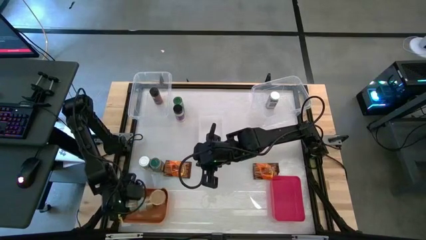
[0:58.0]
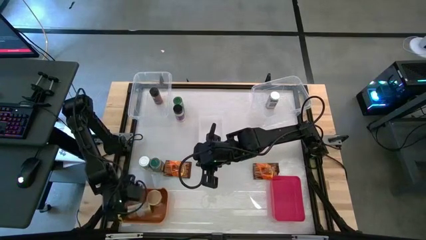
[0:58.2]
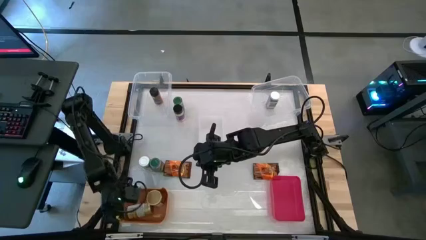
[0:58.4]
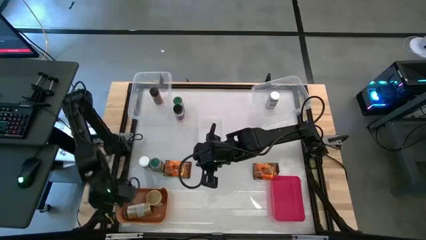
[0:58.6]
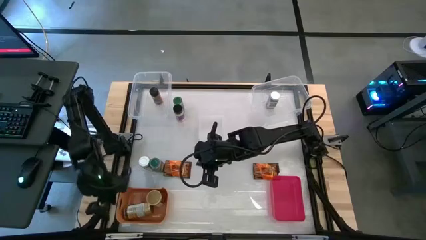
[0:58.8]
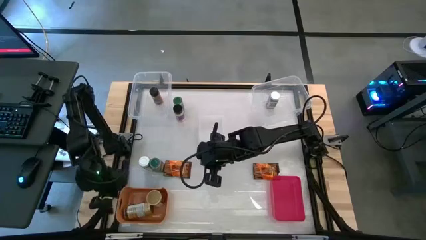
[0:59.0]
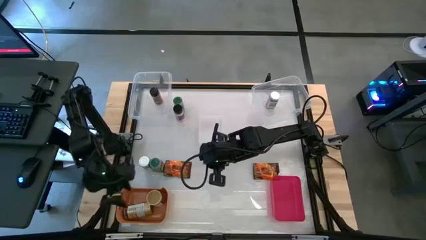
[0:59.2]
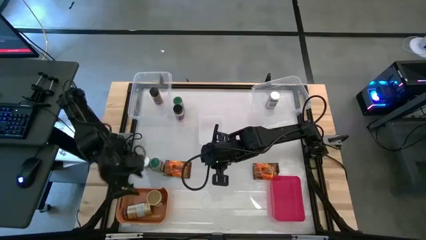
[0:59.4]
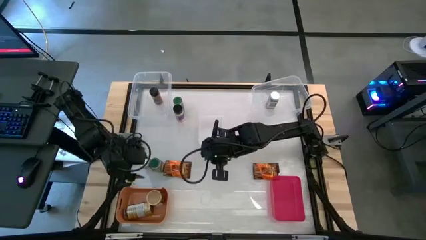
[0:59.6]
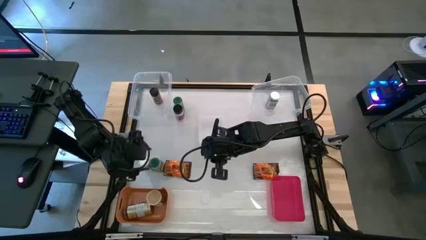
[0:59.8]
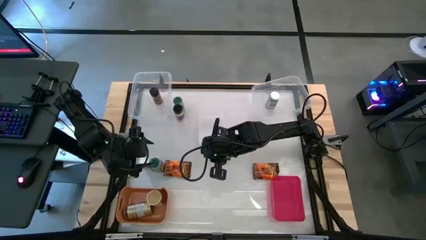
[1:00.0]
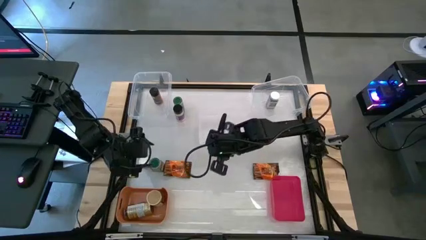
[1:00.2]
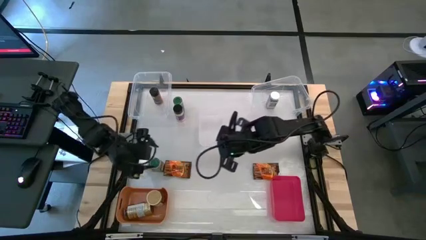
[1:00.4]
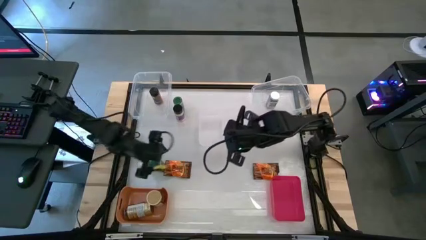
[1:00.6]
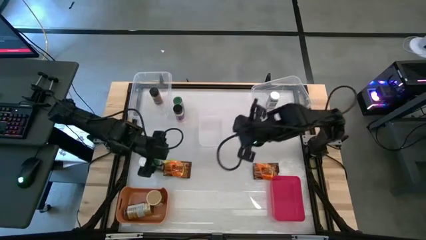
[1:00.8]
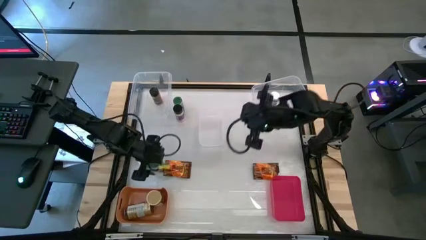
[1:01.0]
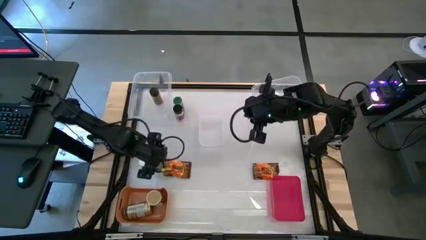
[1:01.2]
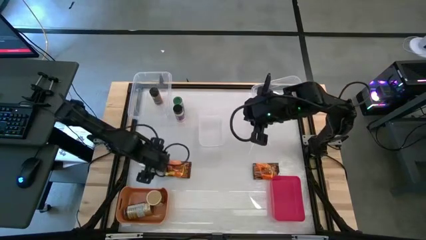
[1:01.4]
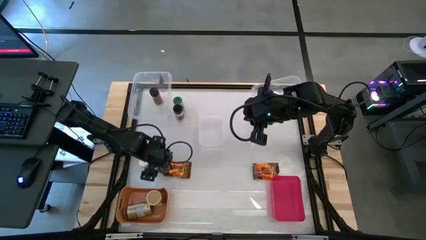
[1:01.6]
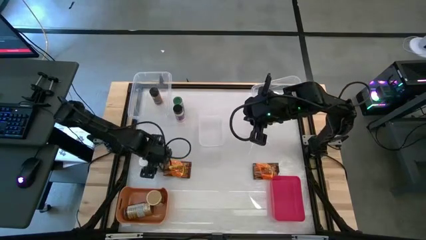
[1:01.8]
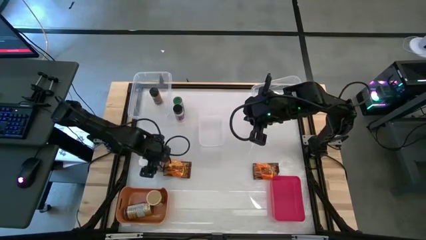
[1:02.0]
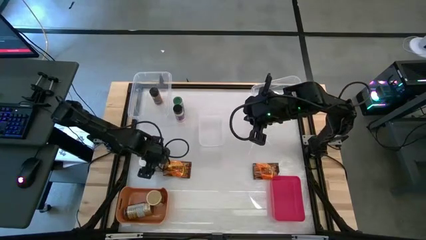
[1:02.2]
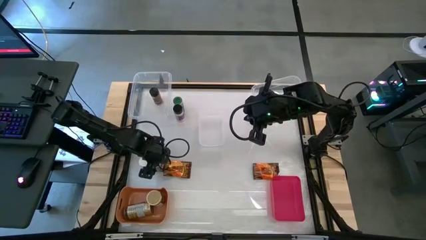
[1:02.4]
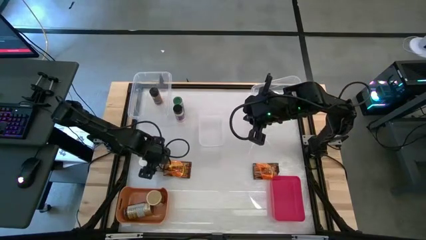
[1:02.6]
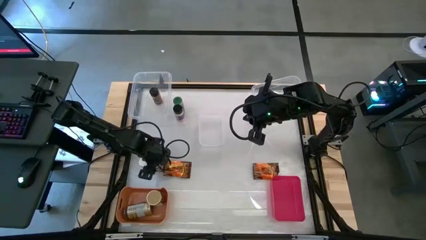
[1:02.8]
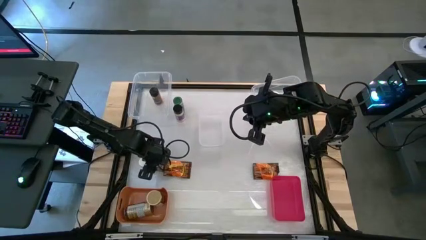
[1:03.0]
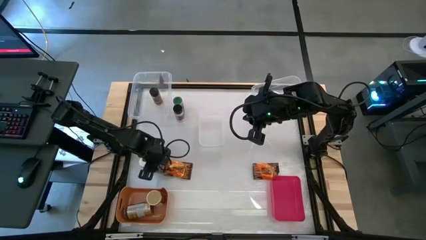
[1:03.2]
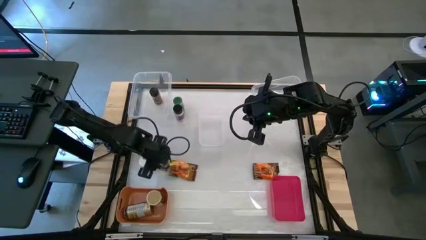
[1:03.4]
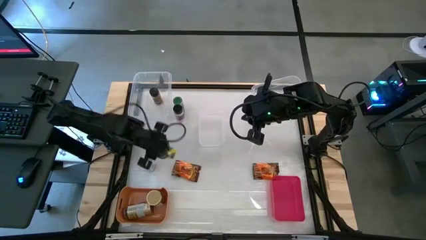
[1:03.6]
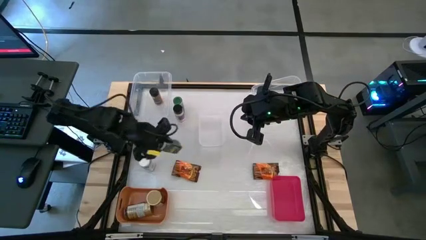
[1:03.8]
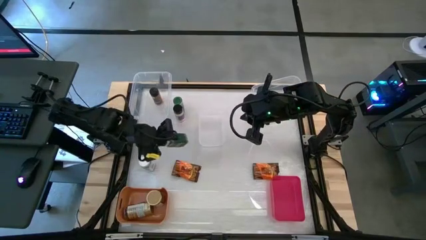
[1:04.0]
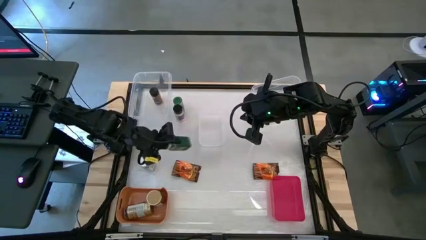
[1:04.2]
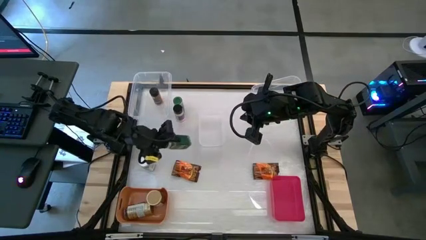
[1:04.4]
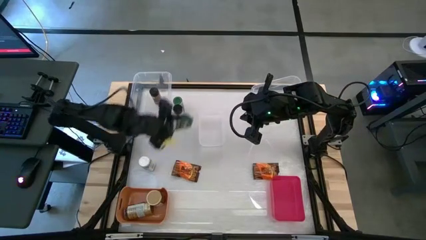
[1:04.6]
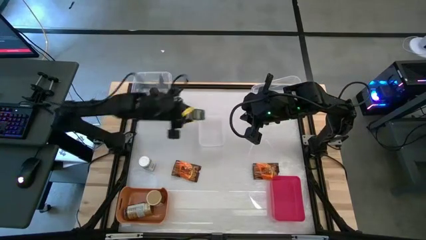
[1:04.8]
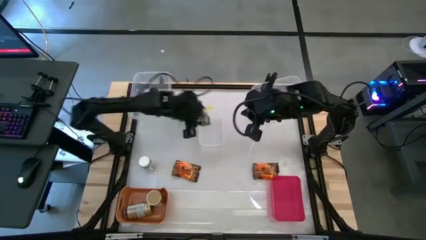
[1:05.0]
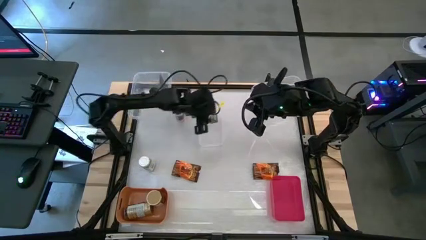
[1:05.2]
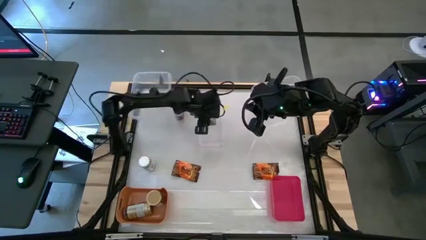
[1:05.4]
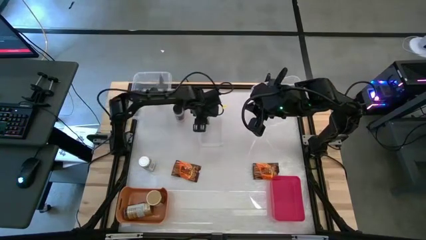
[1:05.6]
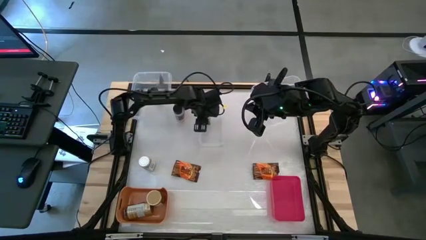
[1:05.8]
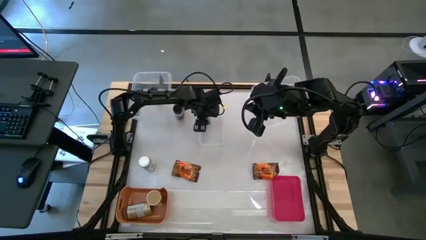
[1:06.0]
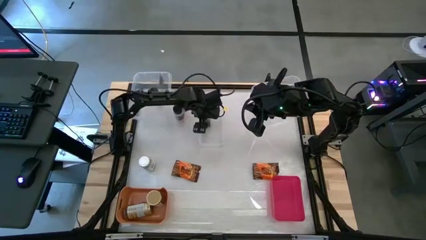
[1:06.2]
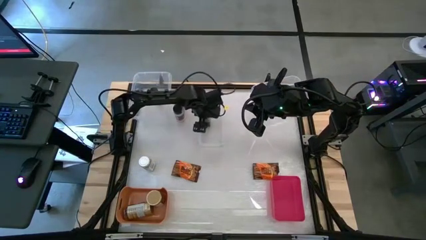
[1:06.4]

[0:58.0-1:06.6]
Task: Sort spices by type
Put the bottom green seasoning bottle into the small transparent bin

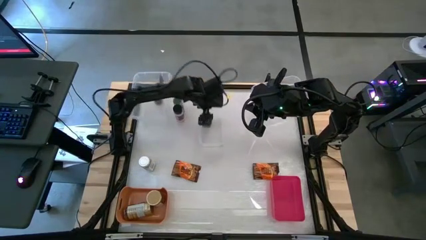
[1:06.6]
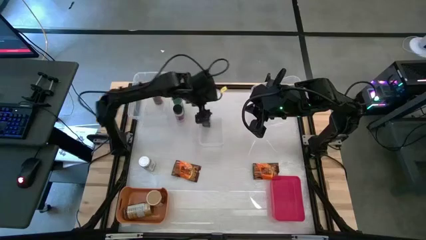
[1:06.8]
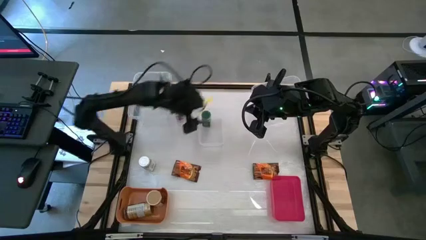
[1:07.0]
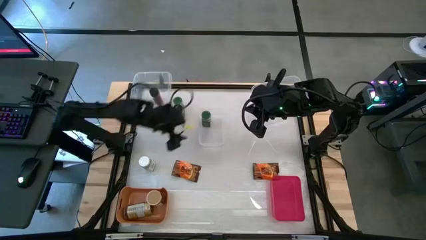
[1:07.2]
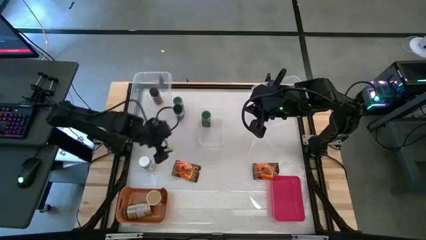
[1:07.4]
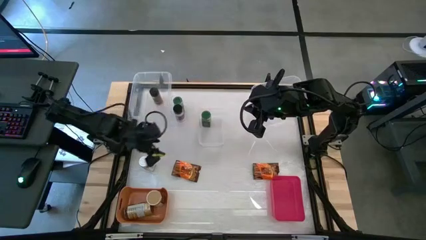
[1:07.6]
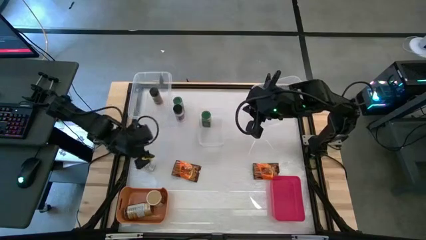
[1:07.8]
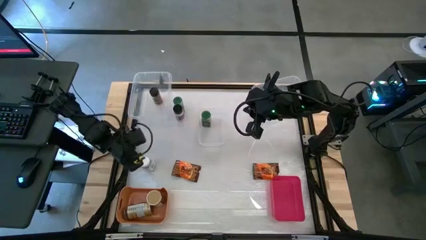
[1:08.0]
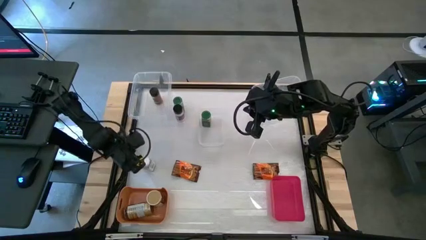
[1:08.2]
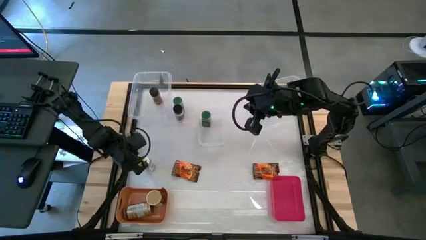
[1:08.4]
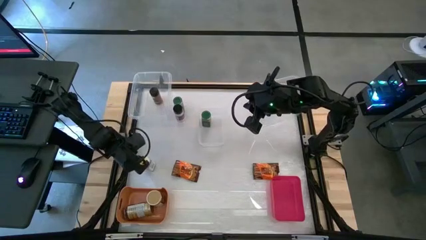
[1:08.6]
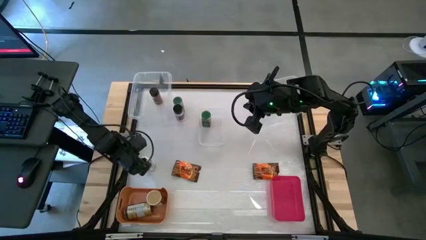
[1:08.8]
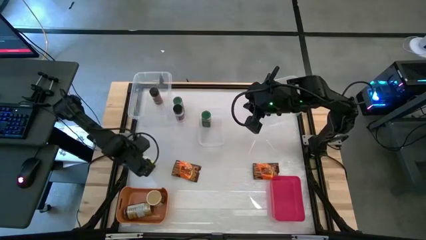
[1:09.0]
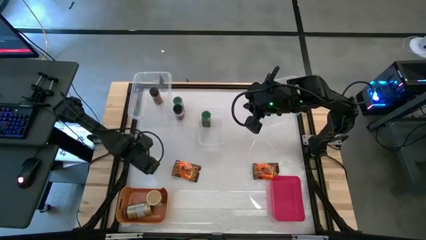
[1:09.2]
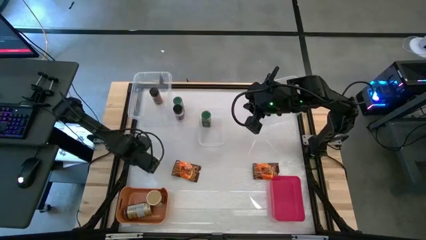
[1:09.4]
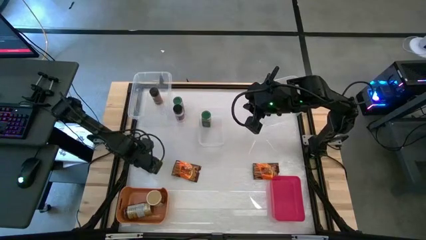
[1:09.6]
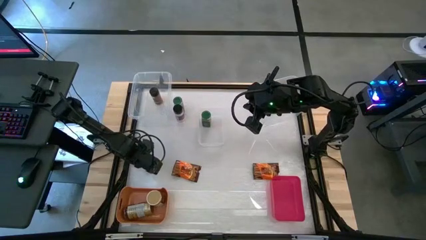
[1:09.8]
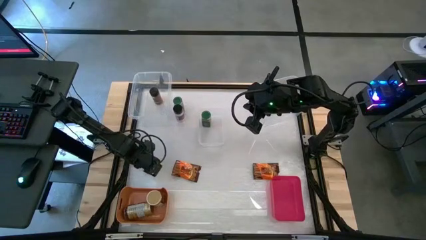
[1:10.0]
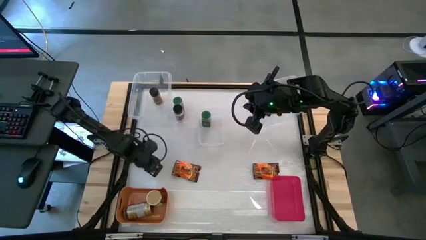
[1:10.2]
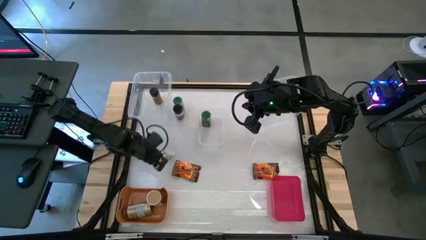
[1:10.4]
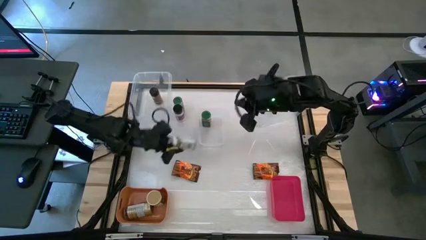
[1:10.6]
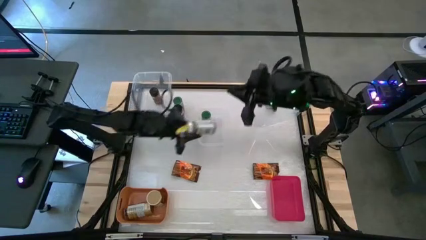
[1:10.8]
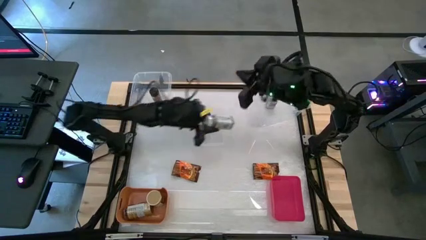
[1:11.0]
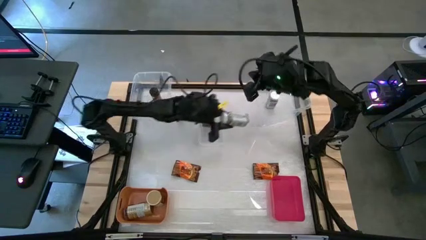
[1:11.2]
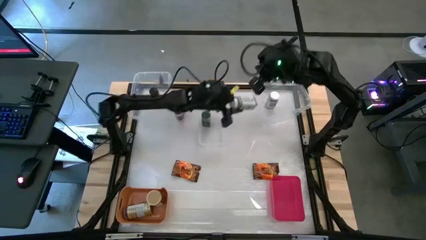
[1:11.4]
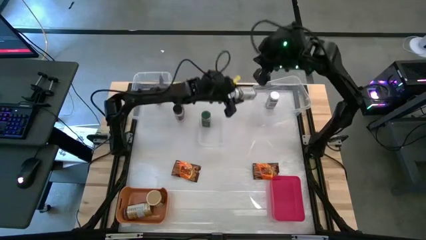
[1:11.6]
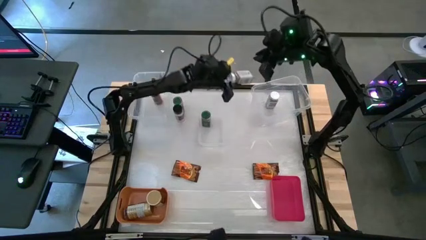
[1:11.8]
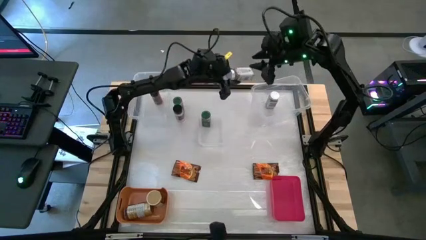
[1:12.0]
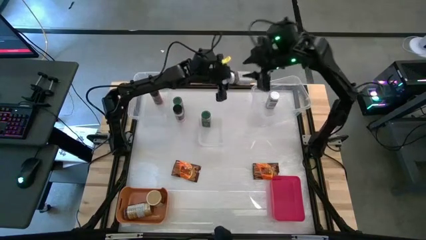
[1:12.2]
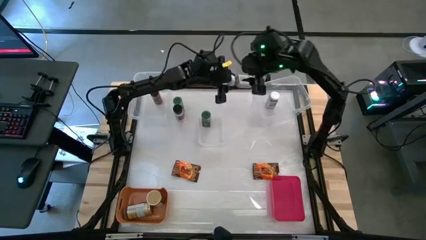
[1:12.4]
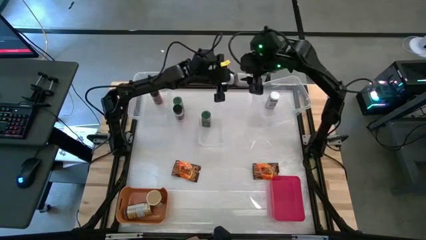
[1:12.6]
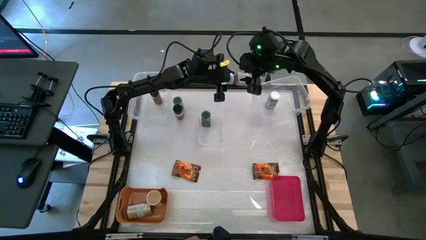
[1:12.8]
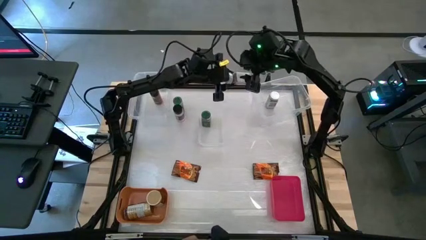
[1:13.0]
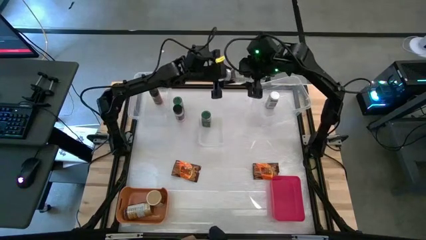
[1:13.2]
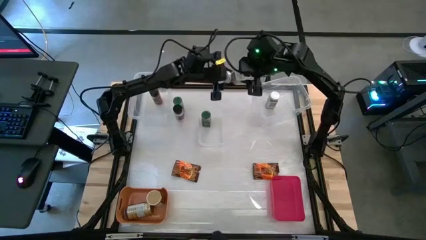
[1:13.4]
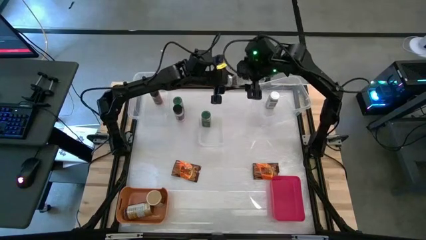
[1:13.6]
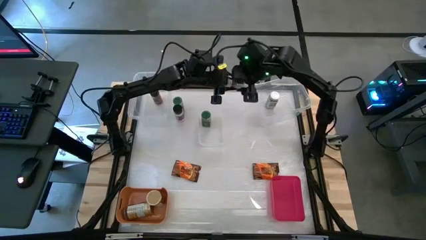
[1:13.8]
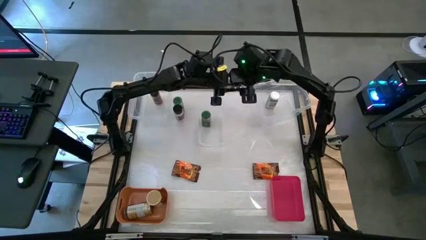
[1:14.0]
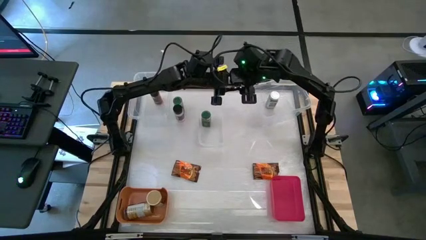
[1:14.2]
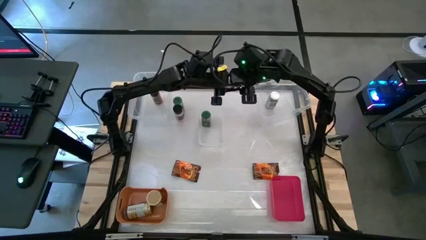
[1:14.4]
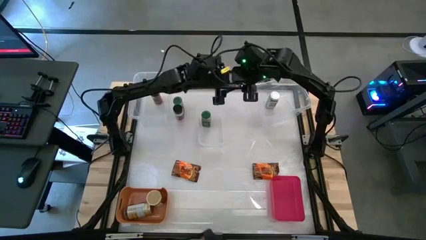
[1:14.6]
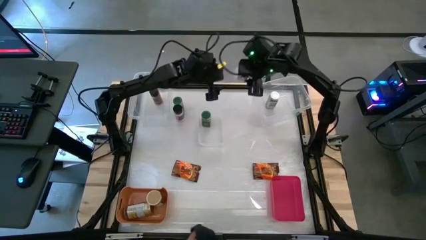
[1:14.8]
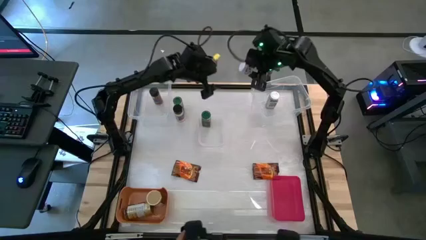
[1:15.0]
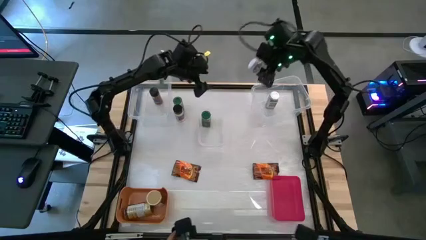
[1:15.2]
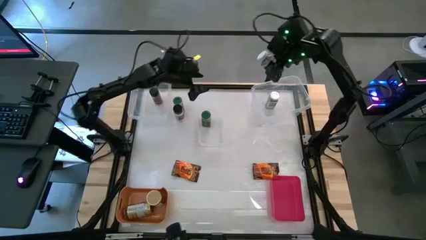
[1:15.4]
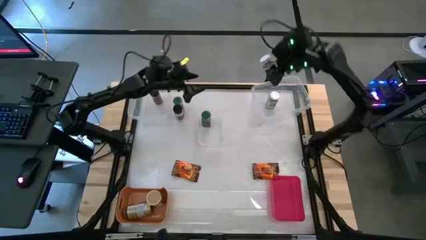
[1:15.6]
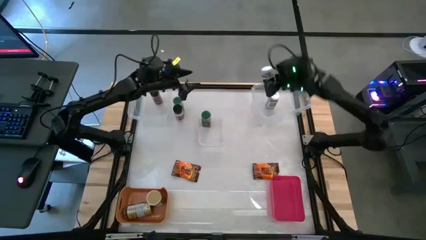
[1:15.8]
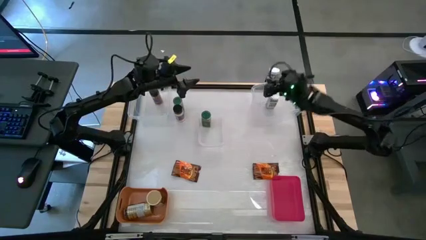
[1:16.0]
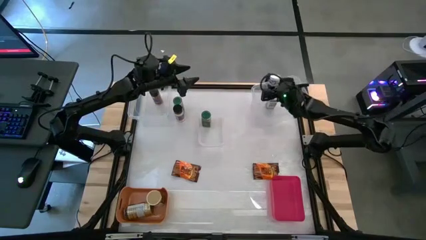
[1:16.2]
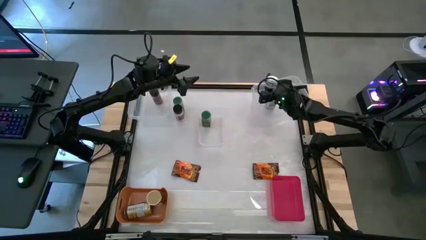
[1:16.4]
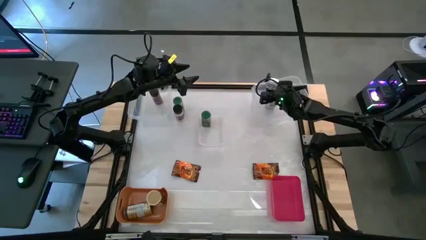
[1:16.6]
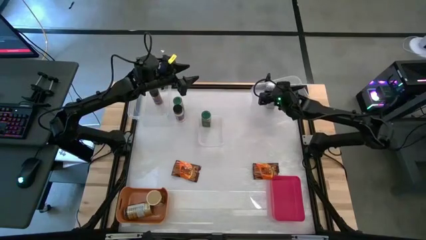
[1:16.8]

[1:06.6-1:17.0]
Put the white seasoning bottle into the right large transparent bin
